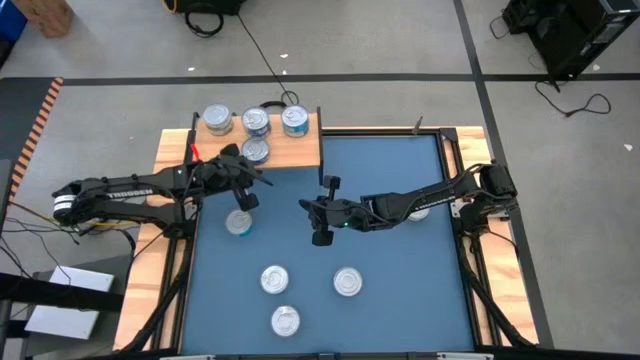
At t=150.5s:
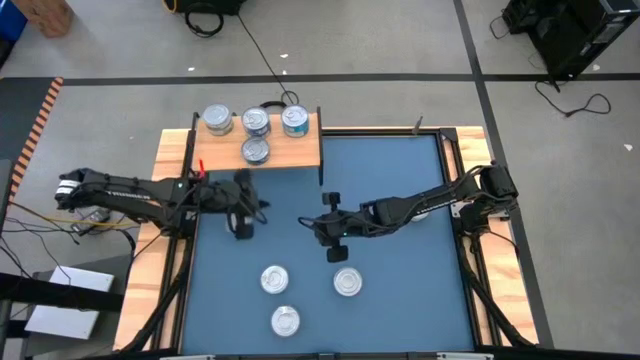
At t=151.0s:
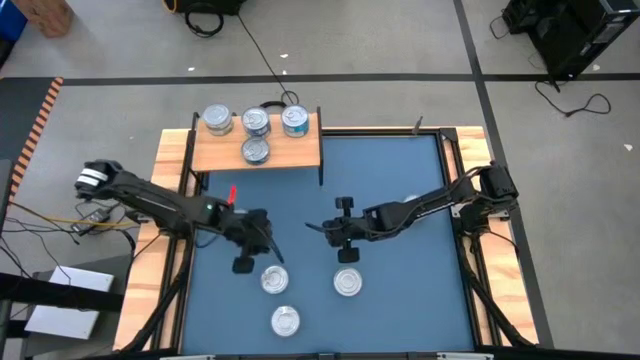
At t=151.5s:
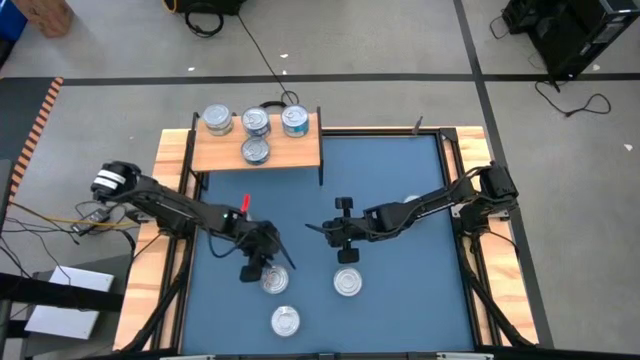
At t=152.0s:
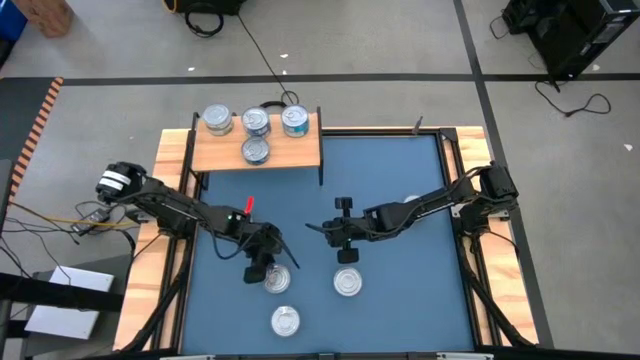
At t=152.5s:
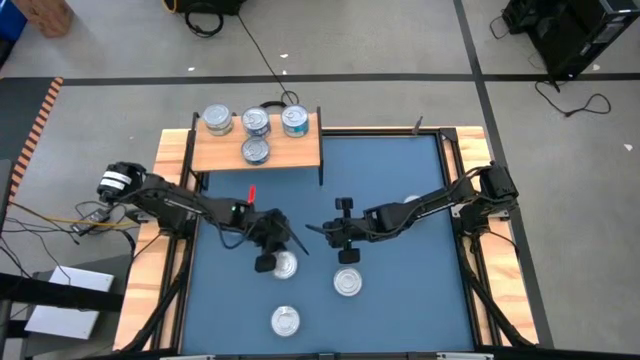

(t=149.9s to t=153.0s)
Task: Stack canned seafood by type on shelf
Put the yellow blue tuna can on the shelf aligned with the other yellow blue tuna cans

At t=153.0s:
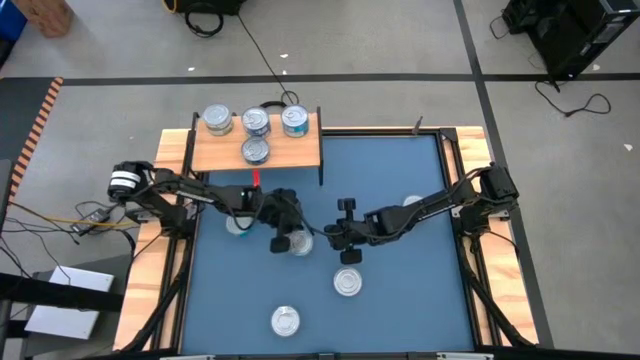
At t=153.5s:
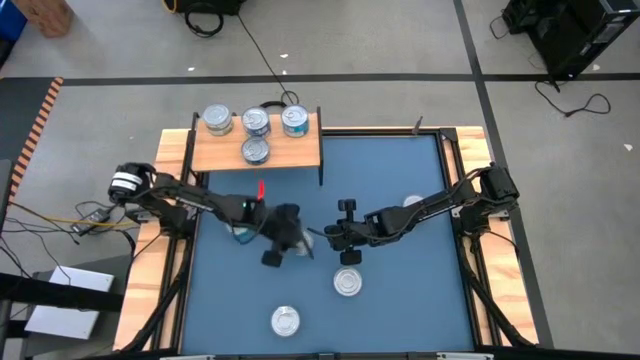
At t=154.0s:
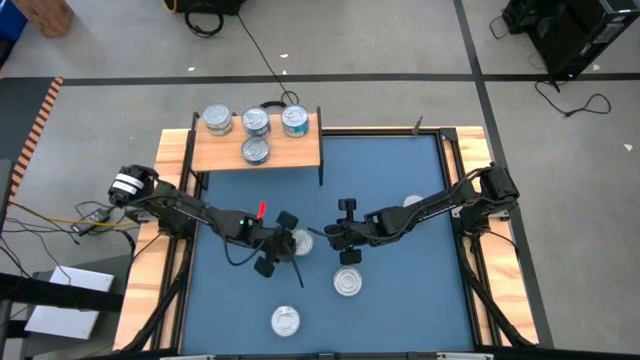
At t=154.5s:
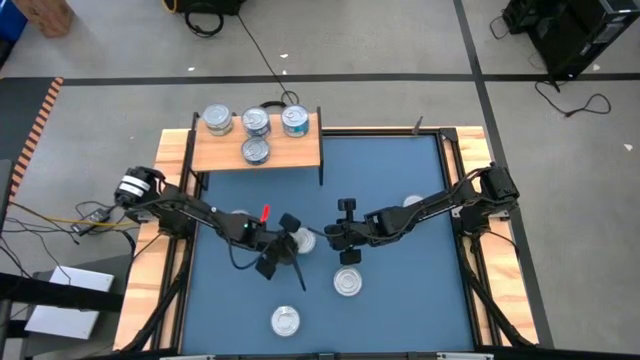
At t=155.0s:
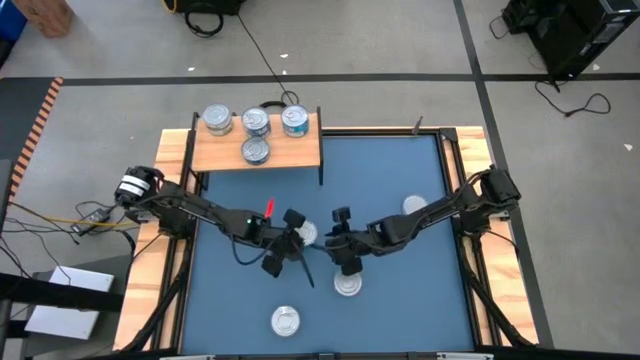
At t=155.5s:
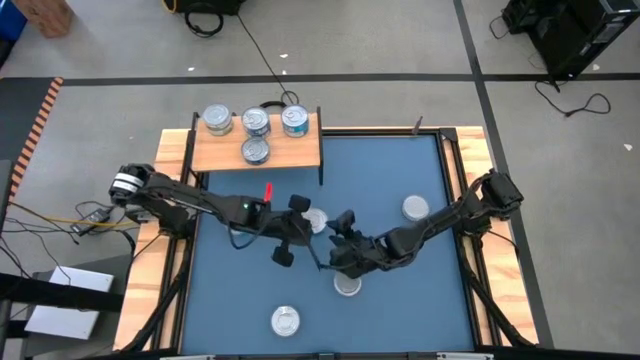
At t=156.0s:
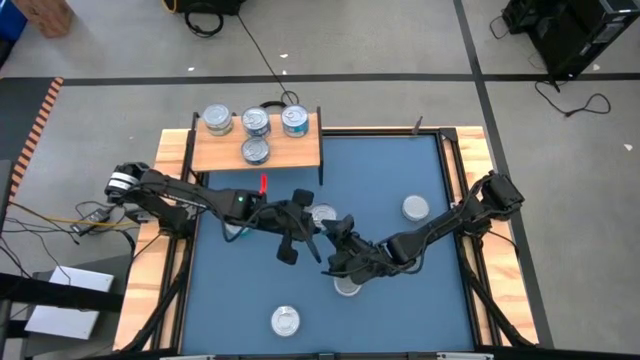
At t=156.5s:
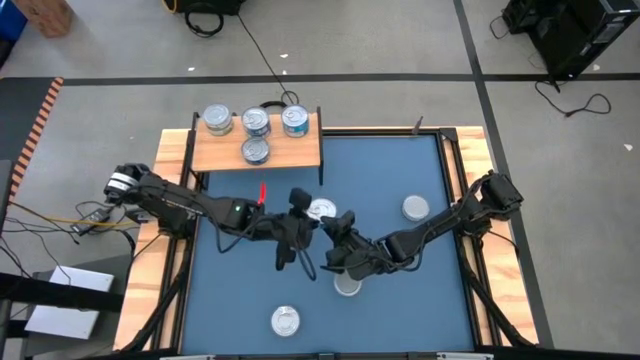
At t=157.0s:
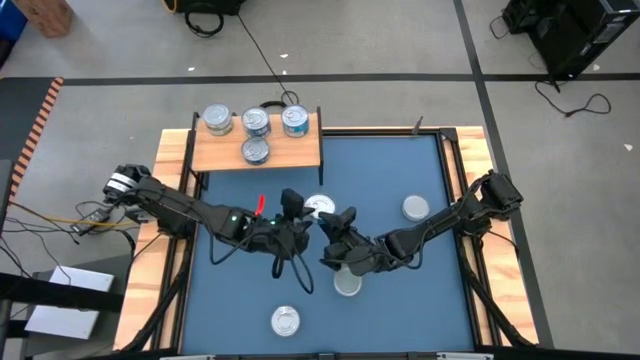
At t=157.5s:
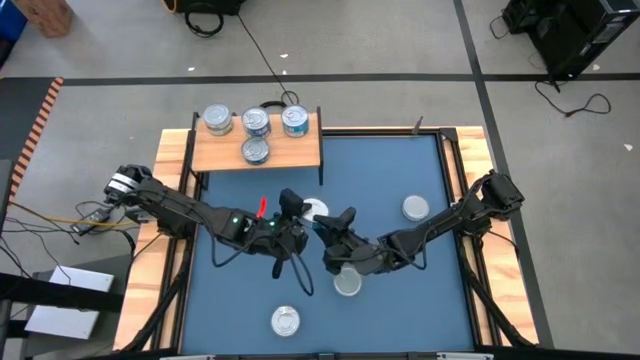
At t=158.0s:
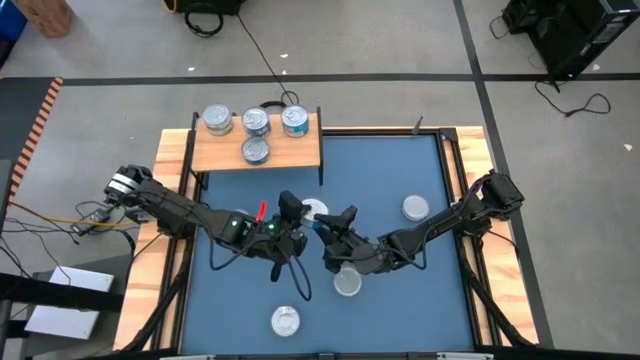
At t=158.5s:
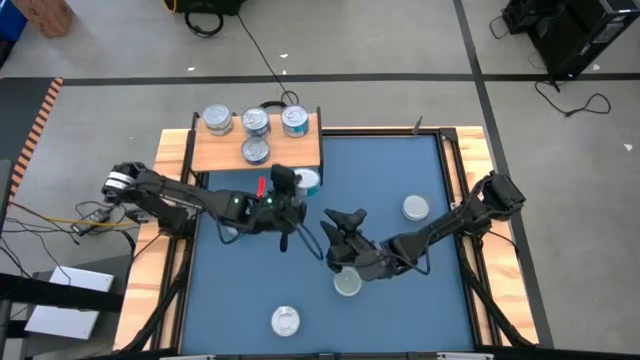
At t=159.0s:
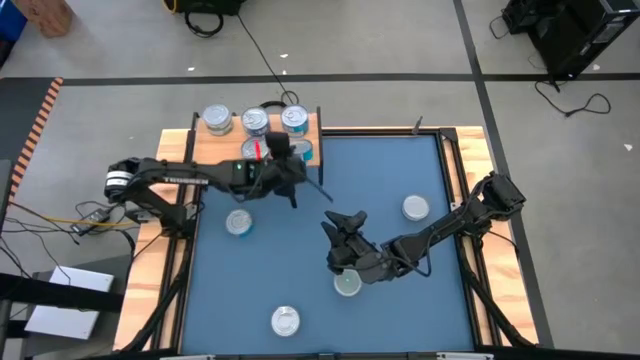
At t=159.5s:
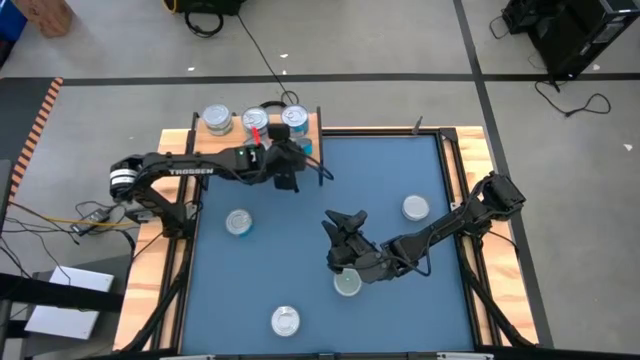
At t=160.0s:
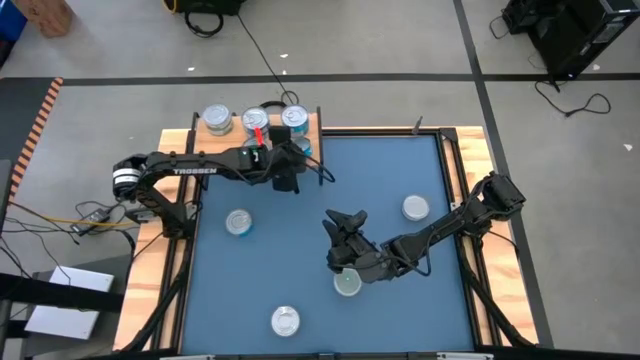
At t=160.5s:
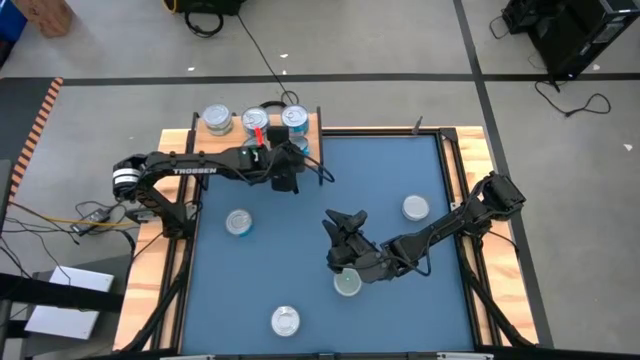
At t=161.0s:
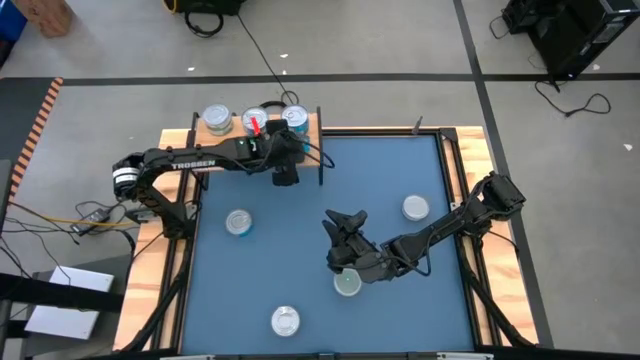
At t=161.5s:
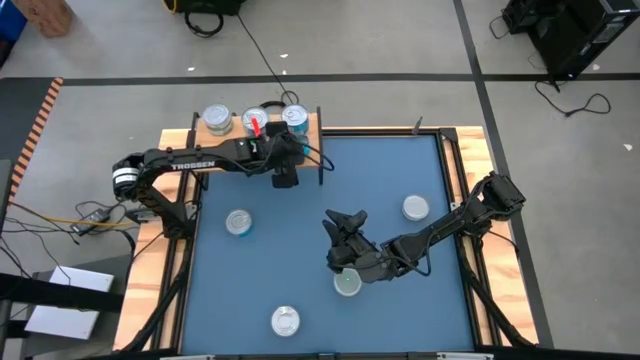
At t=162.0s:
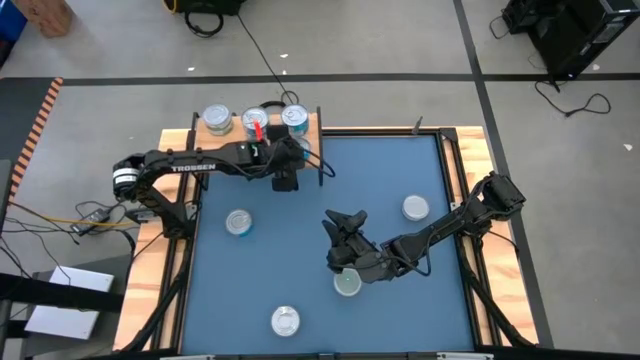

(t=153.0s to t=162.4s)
Put the yellow blue tuna can on the shelf aligned with the other yellow blue tuna cans

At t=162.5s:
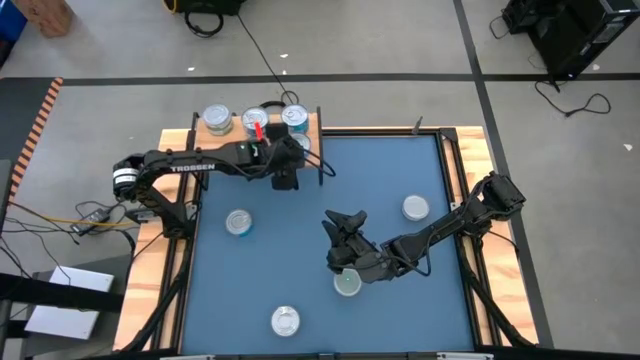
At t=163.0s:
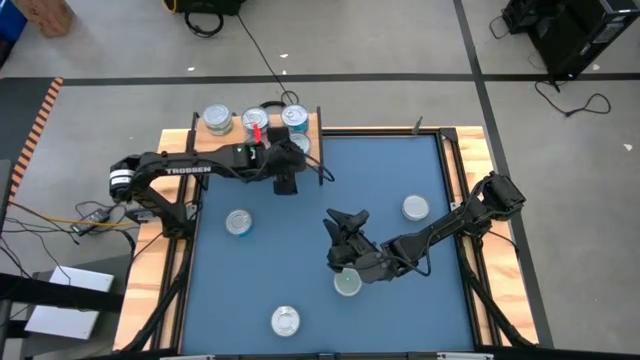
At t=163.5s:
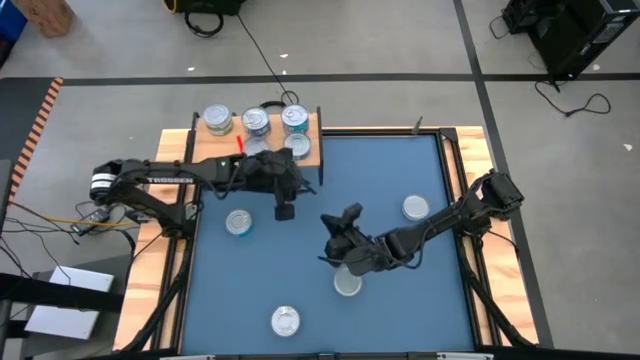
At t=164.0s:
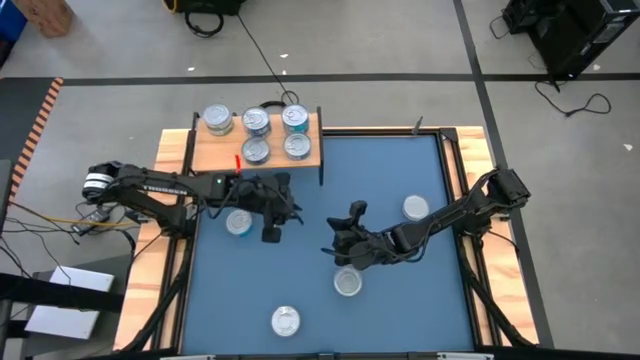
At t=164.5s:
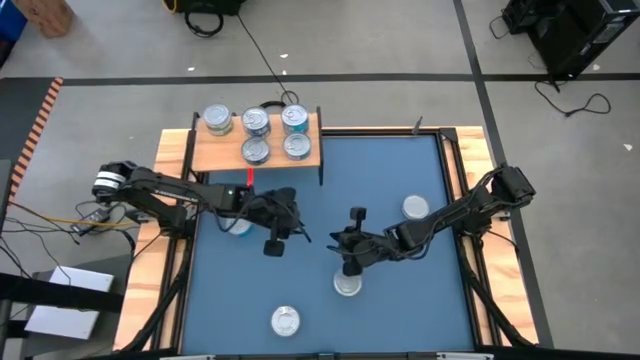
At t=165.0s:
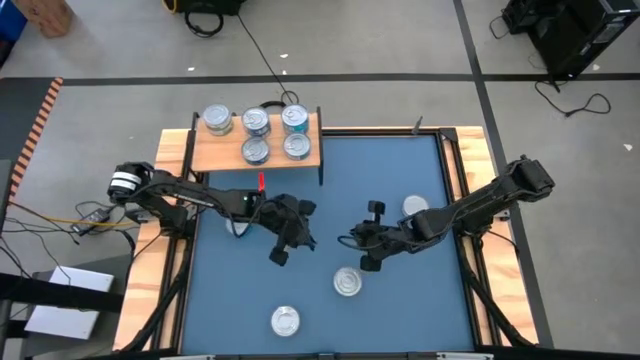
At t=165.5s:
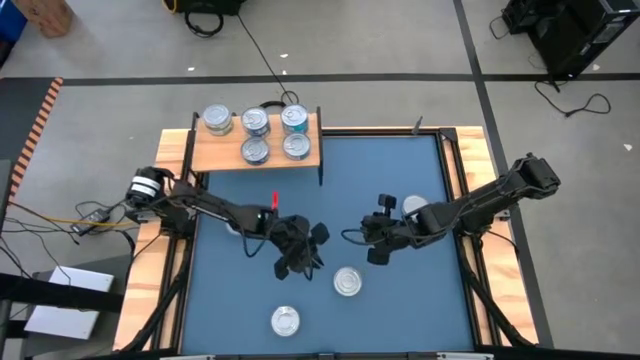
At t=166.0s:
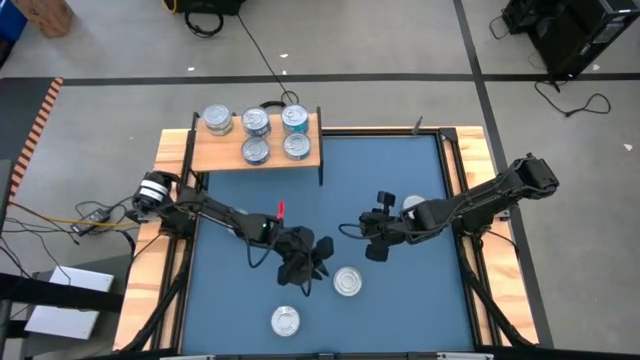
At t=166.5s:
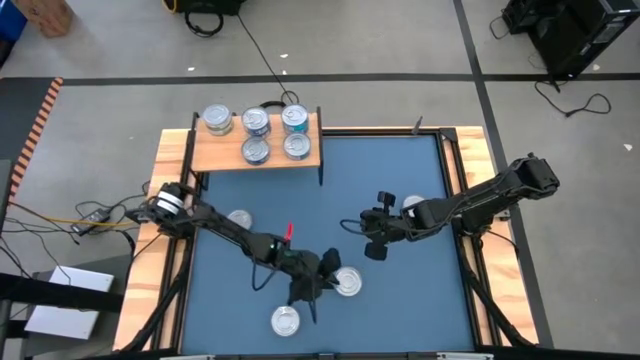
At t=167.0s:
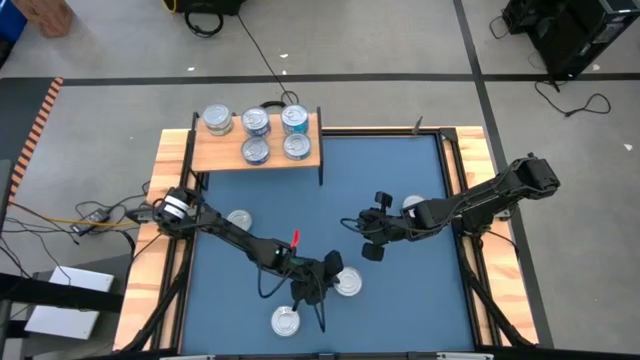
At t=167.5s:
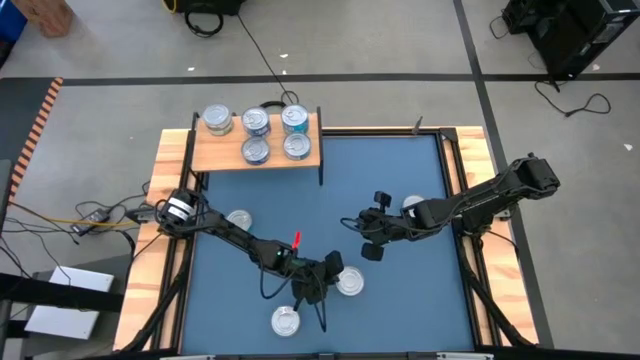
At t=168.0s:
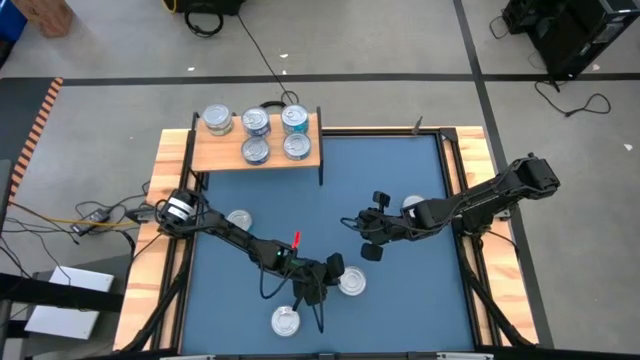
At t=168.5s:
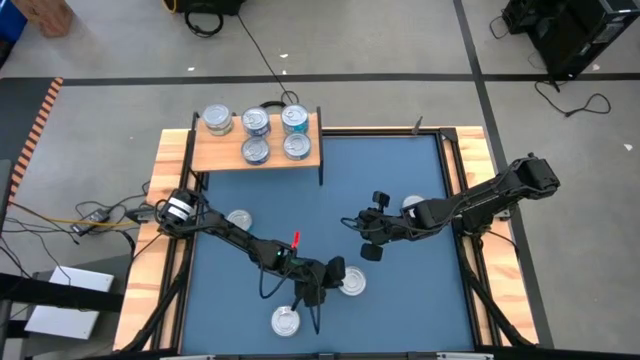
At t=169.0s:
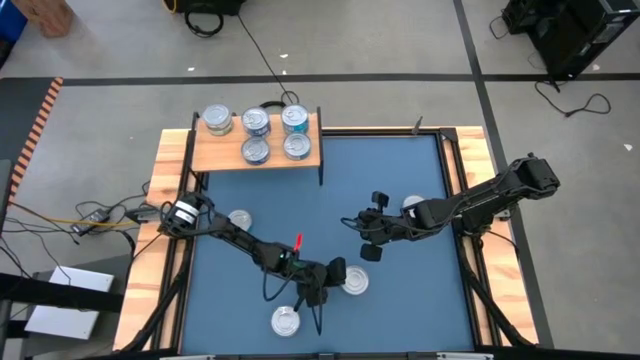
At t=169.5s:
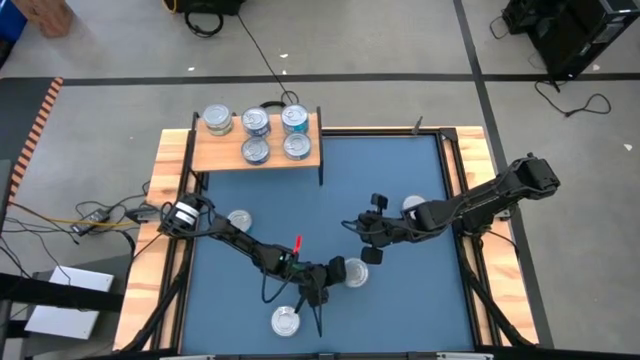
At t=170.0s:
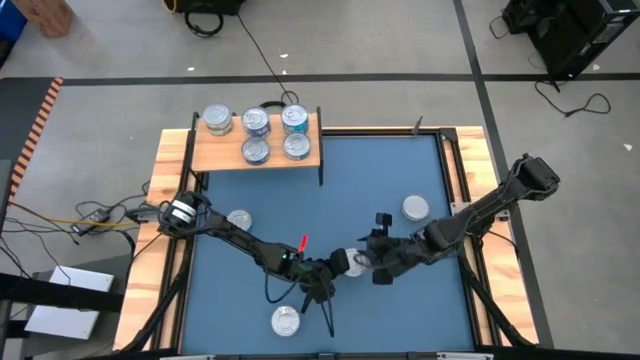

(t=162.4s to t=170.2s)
Put the green white tuna can on the shelf aligned with the other green white tuna cans
